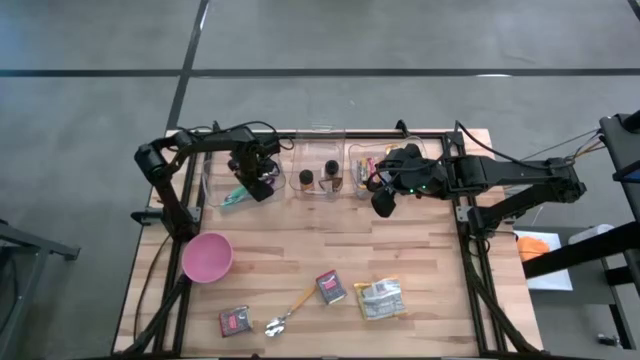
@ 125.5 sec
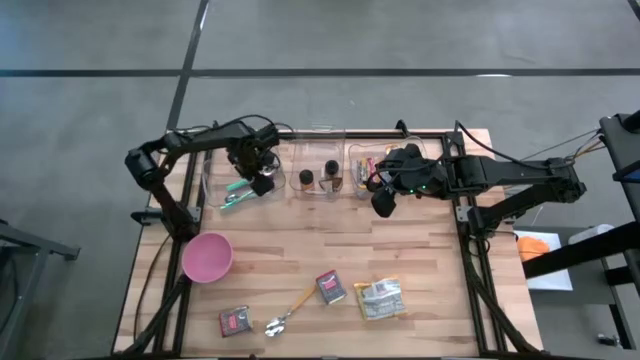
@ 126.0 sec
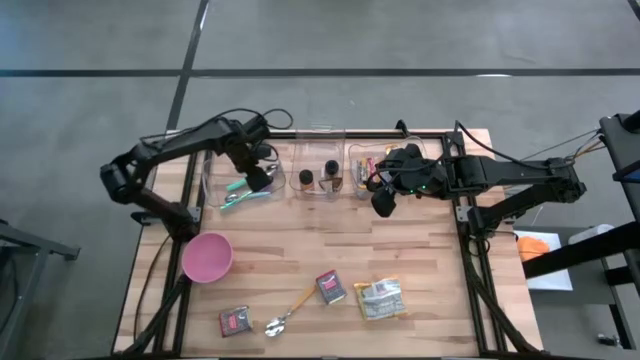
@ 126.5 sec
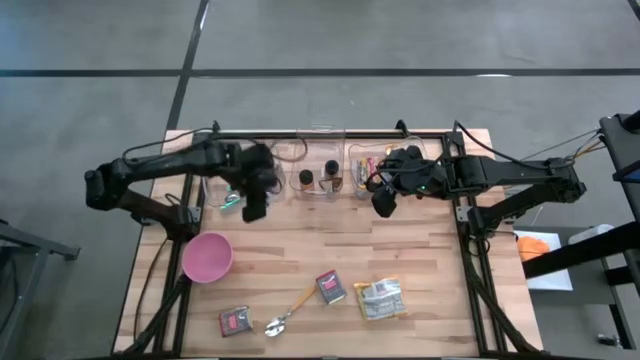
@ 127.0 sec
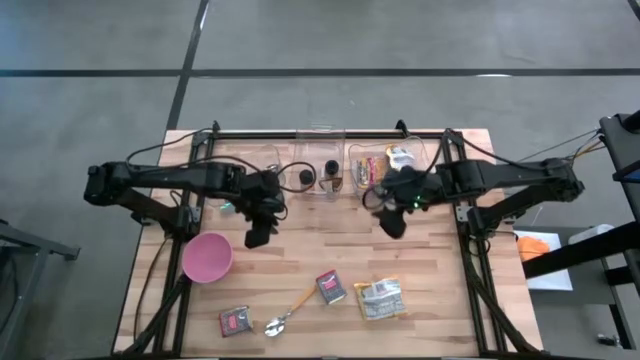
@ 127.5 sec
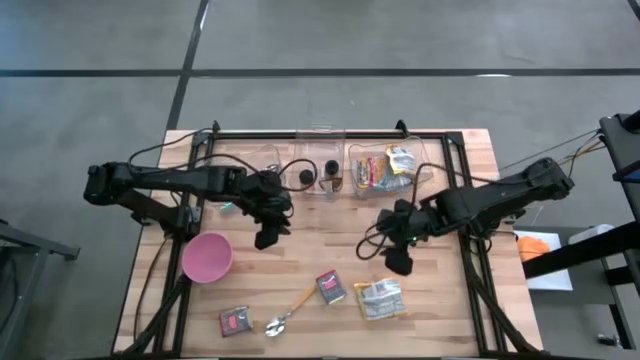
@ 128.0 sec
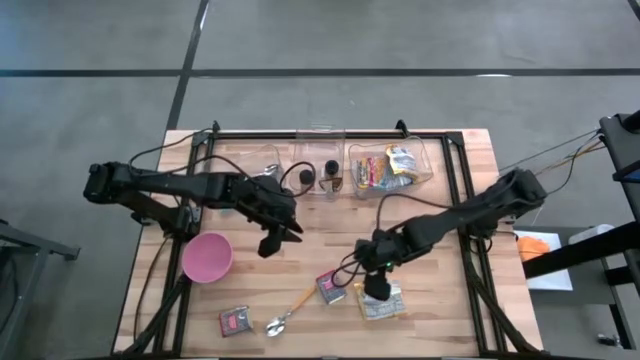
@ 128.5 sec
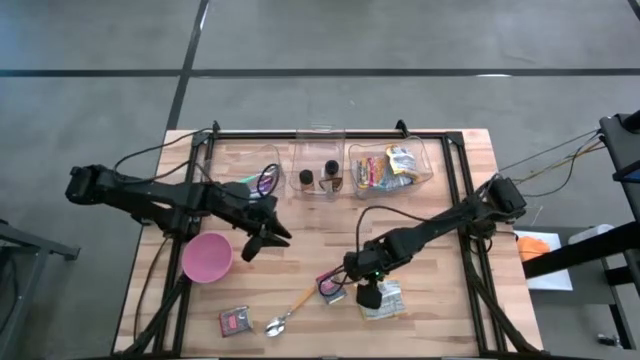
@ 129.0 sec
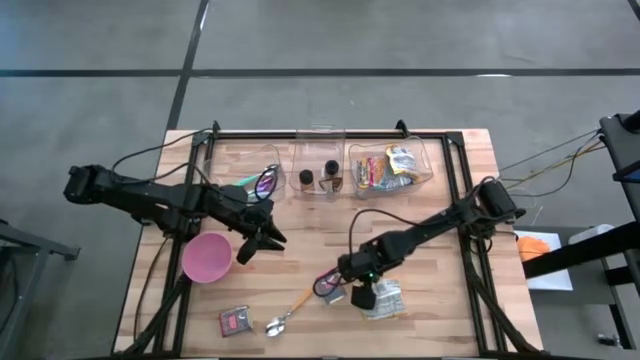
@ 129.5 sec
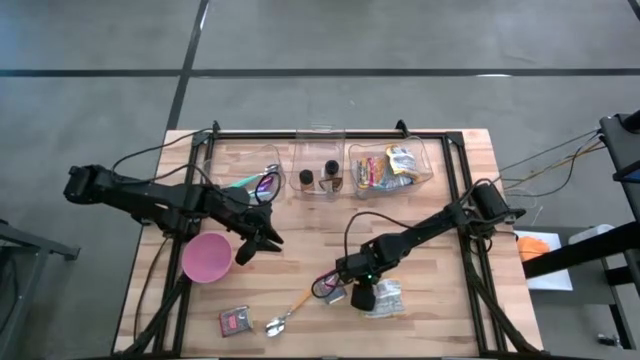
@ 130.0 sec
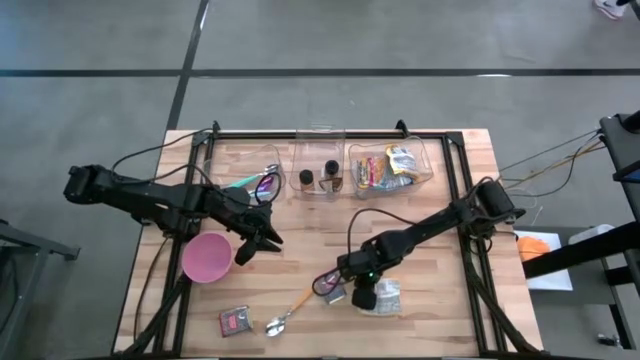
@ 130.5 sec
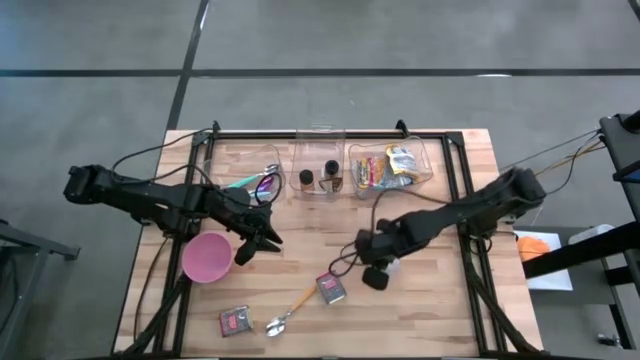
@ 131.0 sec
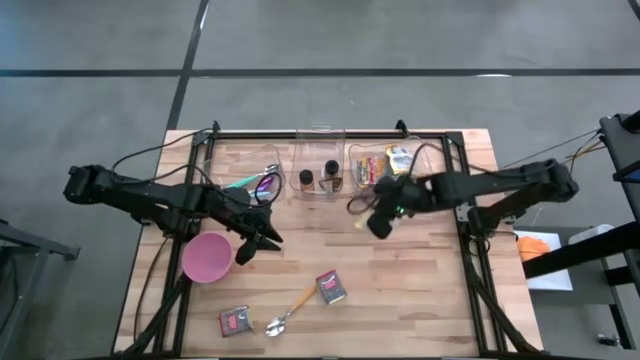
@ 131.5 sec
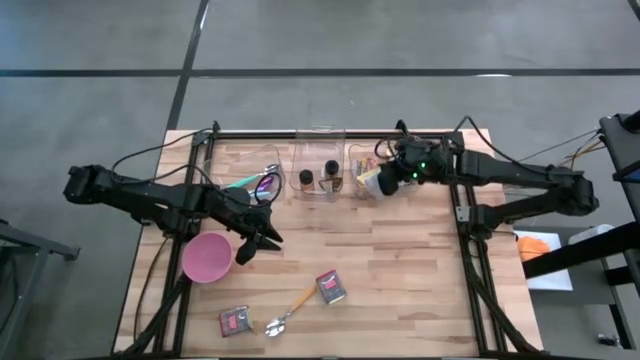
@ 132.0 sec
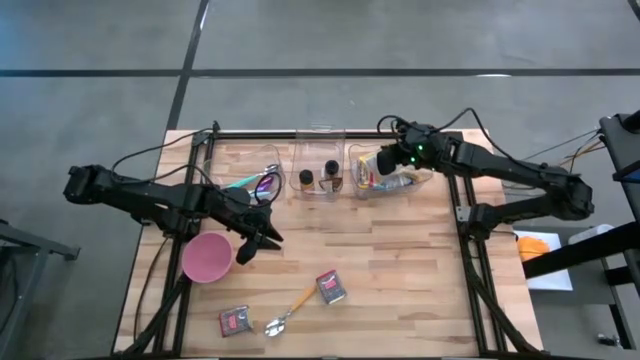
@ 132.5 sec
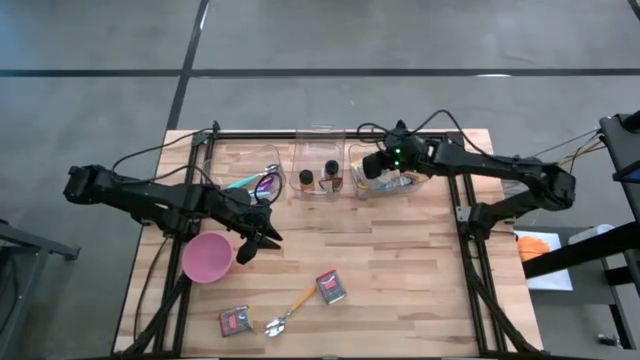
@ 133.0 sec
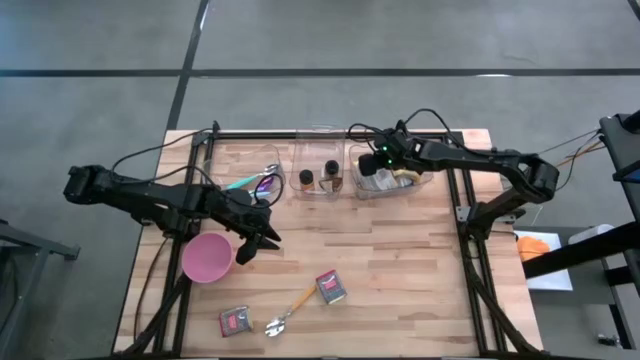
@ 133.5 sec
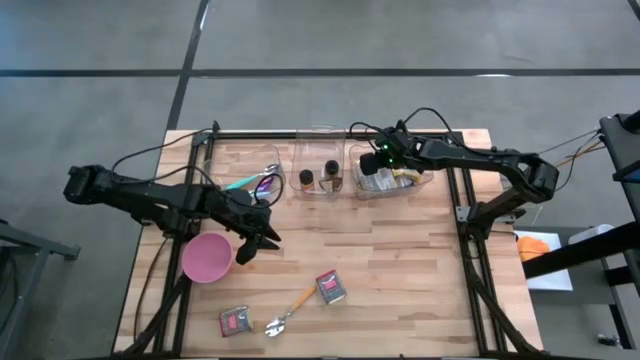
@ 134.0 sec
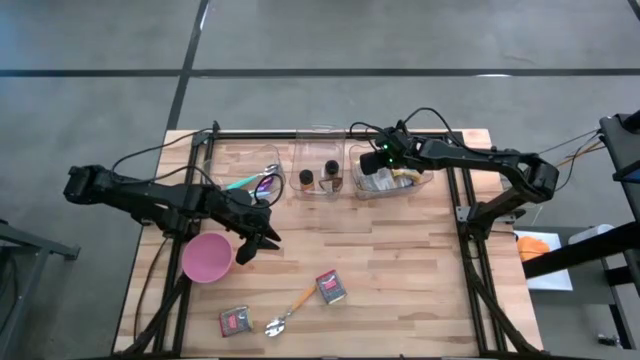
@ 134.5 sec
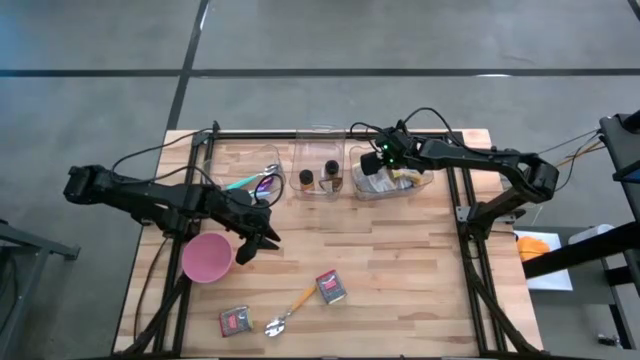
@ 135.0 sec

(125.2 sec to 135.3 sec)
Put the yellow noodle pack into the right transparent bin

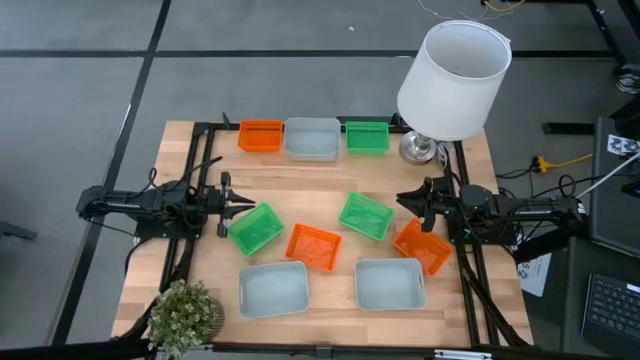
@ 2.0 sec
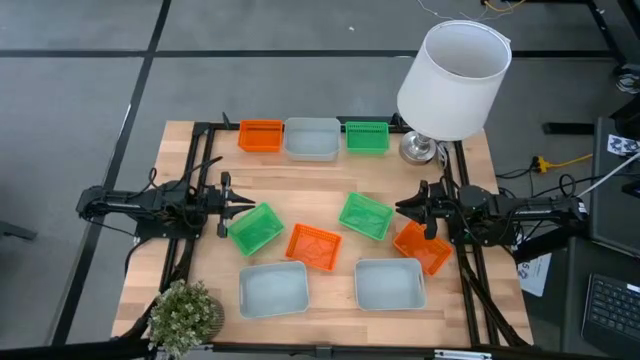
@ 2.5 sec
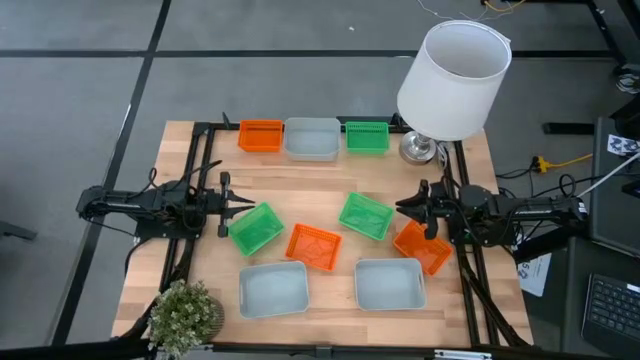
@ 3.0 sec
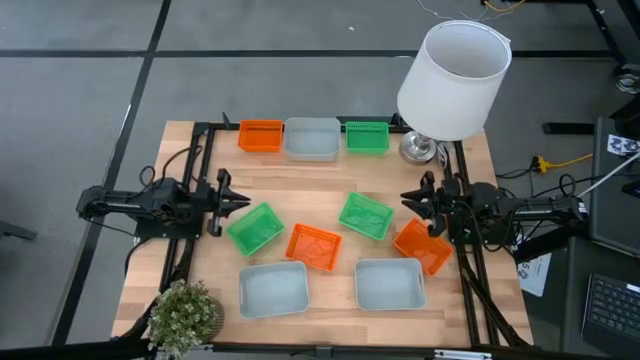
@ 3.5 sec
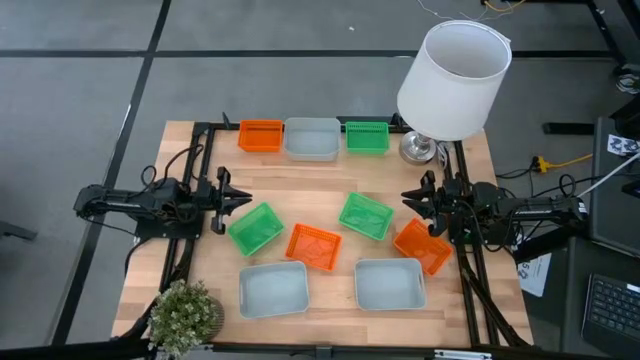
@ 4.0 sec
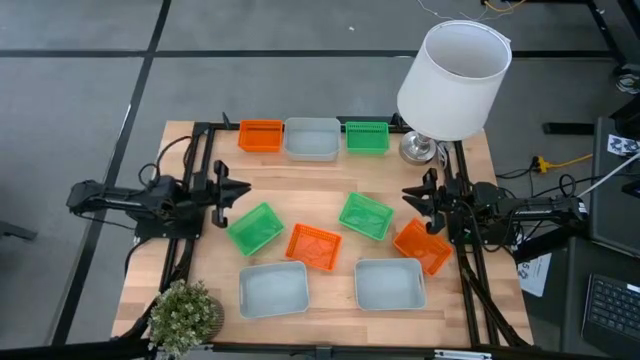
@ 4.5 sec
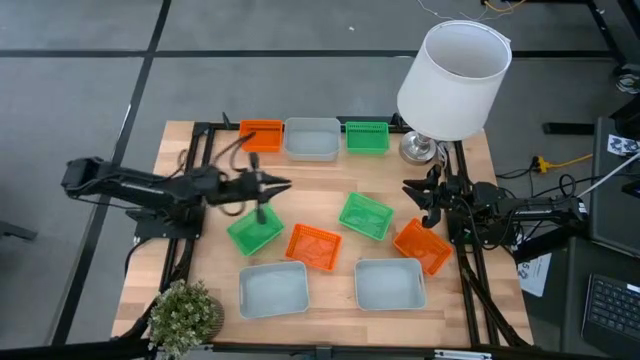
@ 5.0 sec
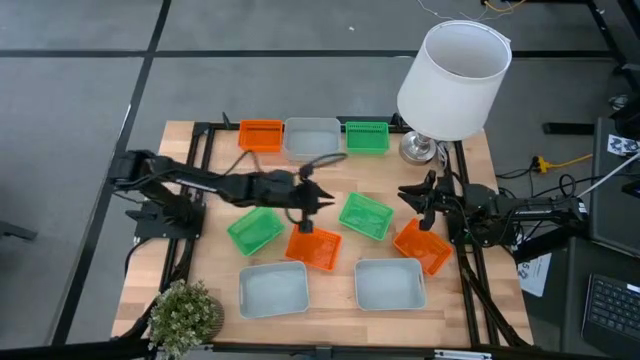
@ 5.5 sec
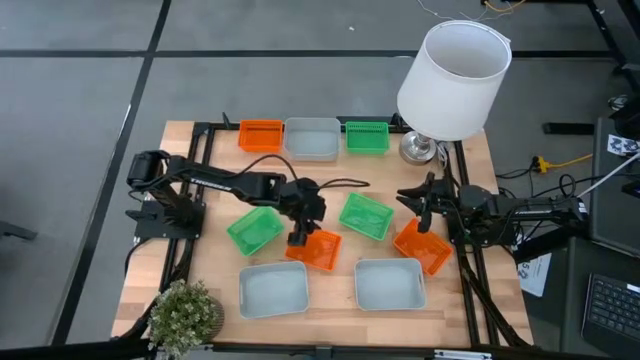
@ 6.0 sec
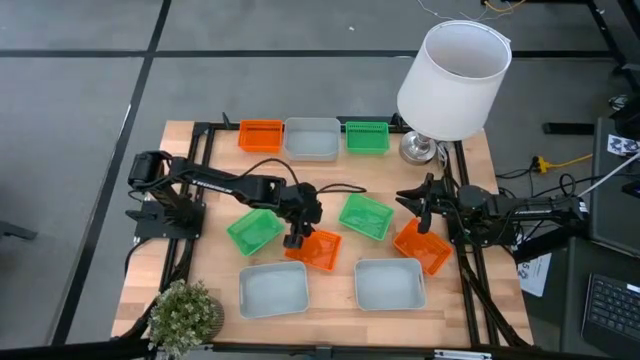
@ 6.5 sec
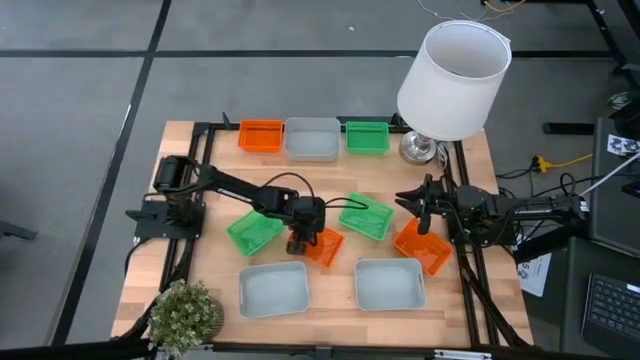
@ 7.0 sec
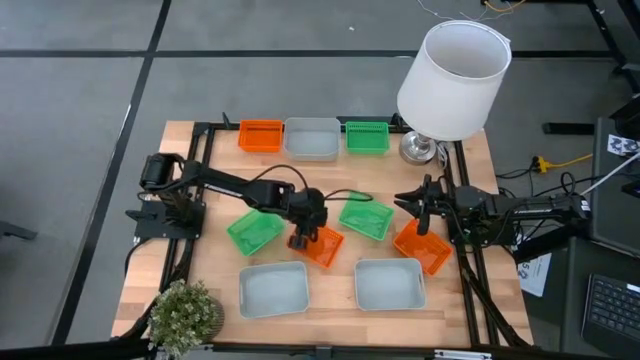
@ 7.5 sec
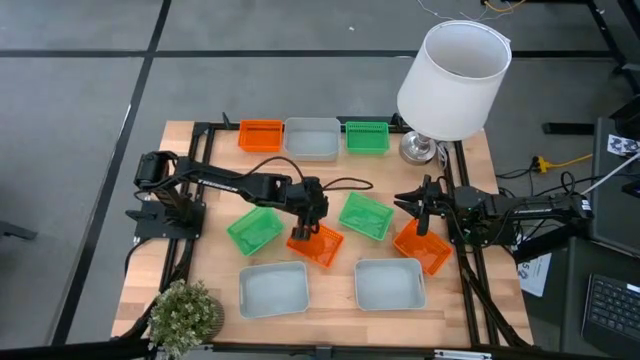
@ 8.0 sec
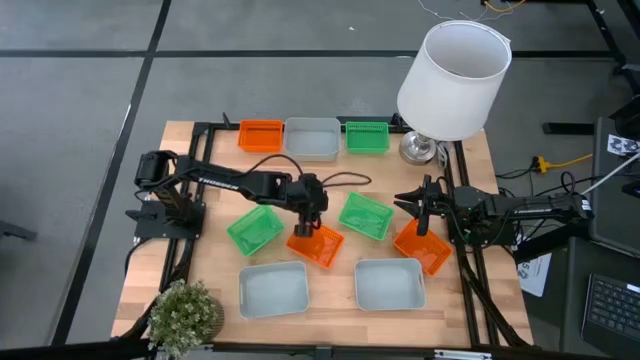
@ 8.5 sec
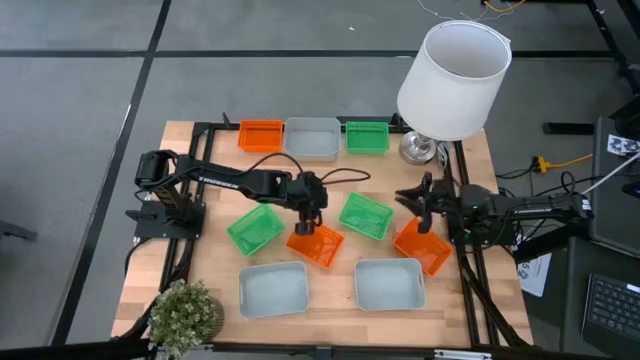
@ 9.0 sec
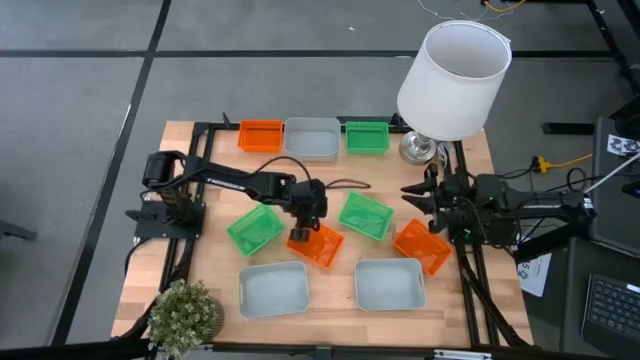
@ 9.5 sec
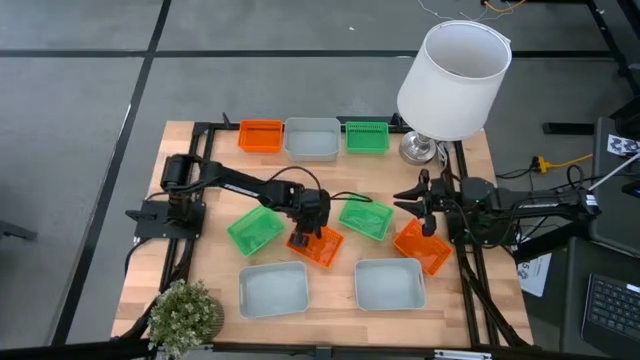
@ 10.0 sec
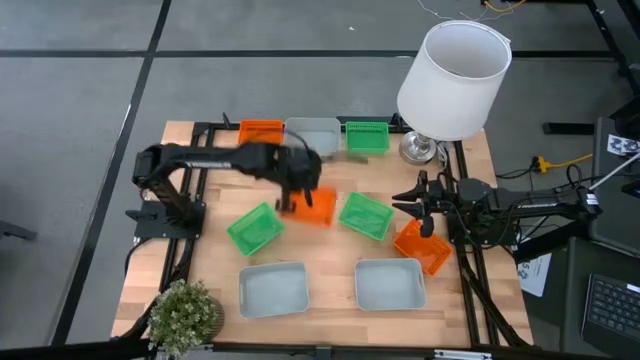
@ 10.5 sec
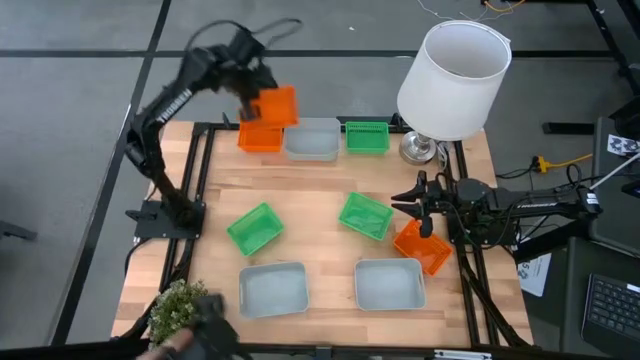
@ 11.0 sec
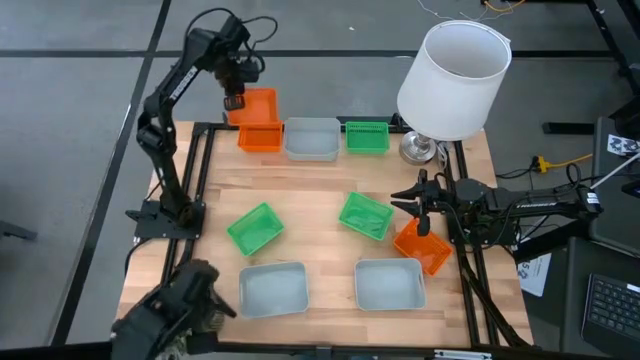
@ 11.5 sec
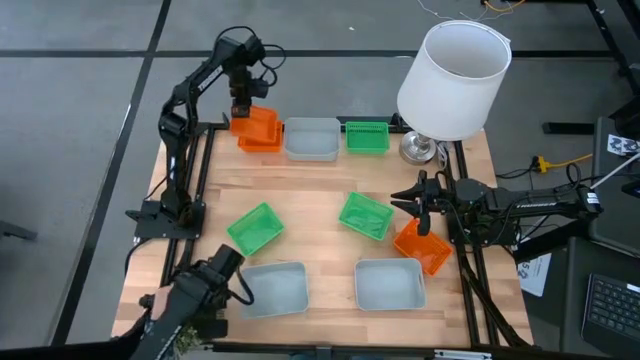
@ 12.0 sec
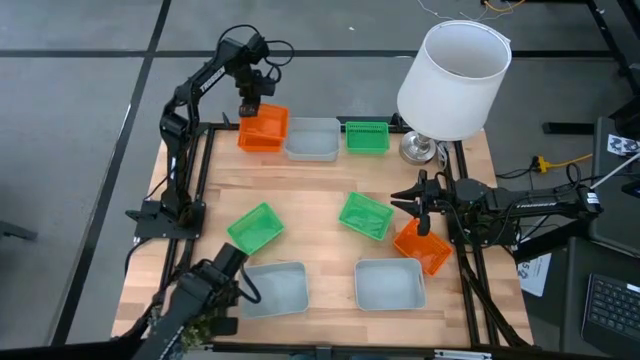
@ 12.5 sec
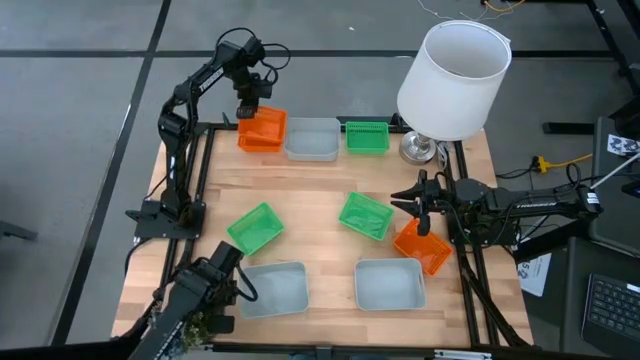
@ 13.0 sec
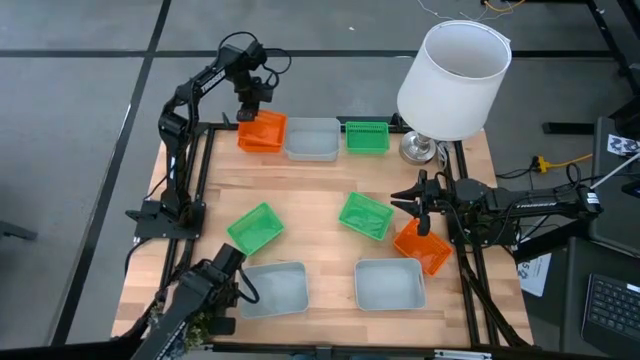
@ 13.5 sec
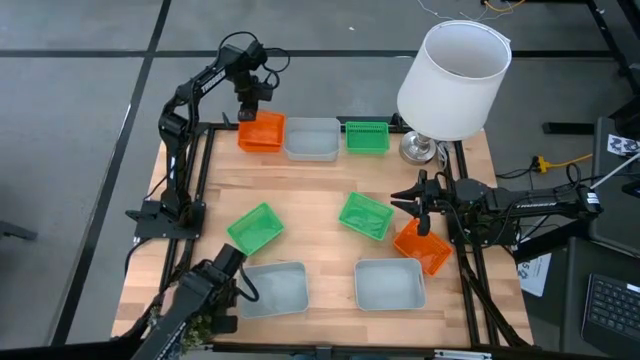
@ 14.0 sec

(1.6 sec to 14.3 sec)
Stack the bottom left orange bin on the top orange bin
